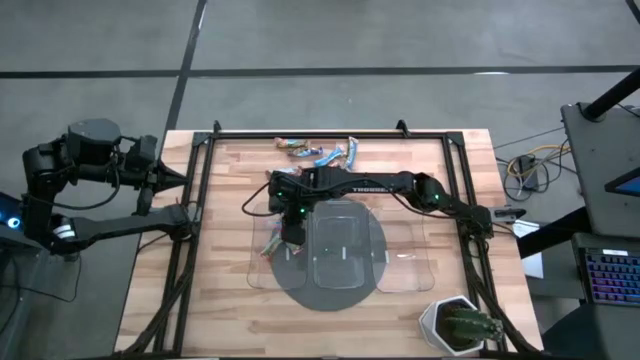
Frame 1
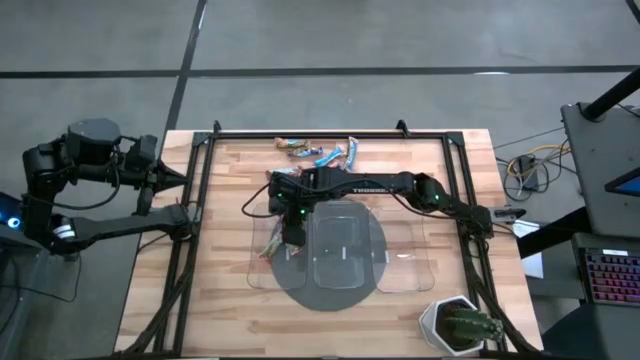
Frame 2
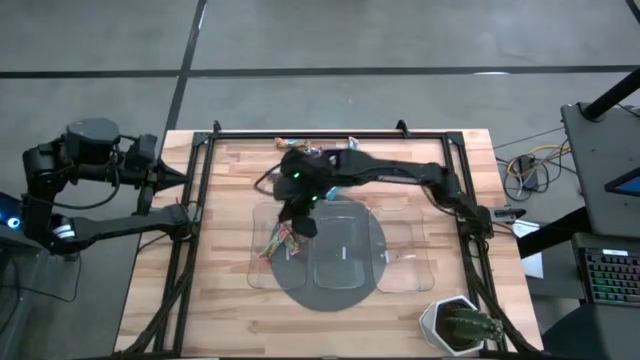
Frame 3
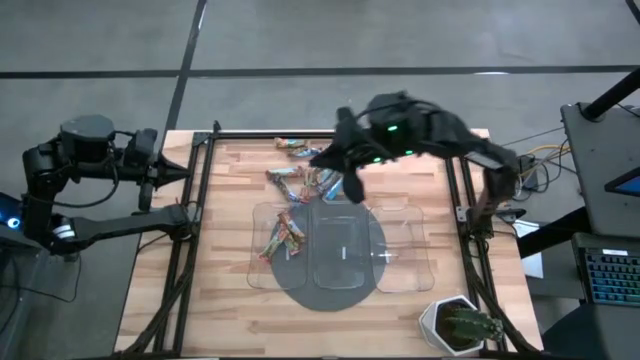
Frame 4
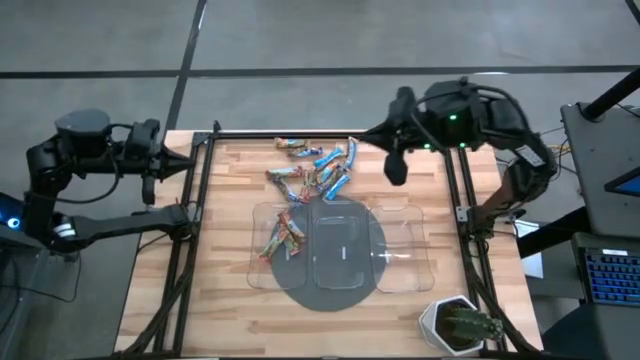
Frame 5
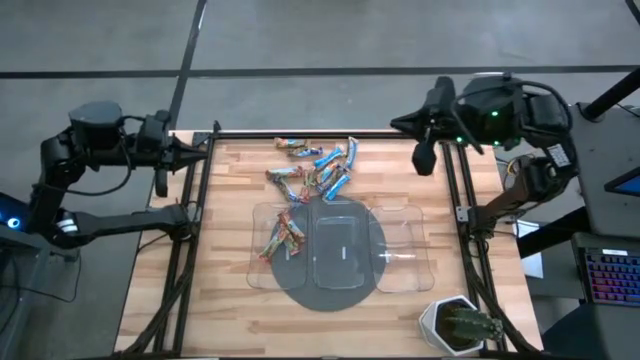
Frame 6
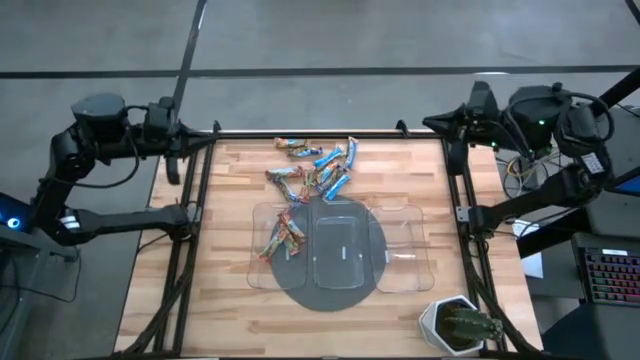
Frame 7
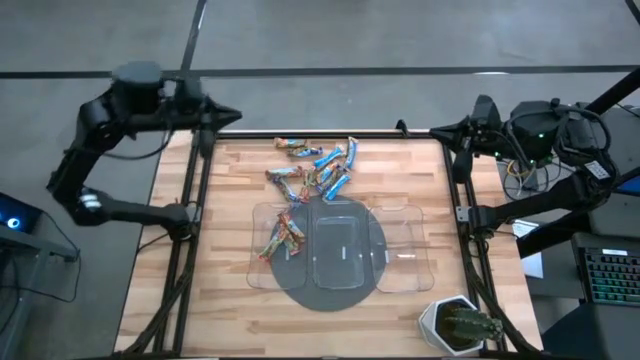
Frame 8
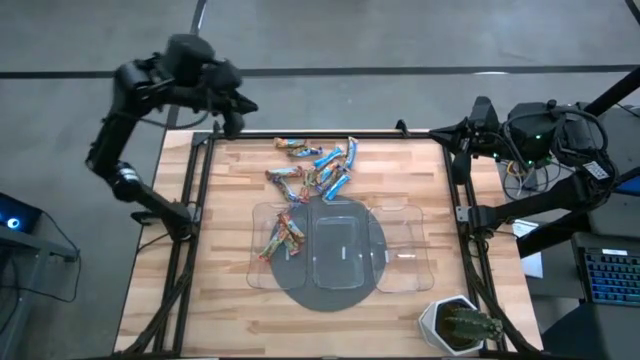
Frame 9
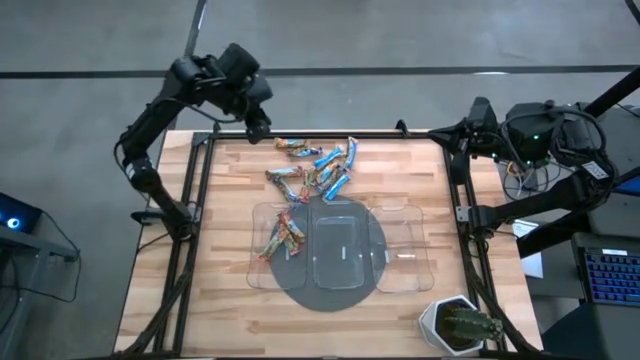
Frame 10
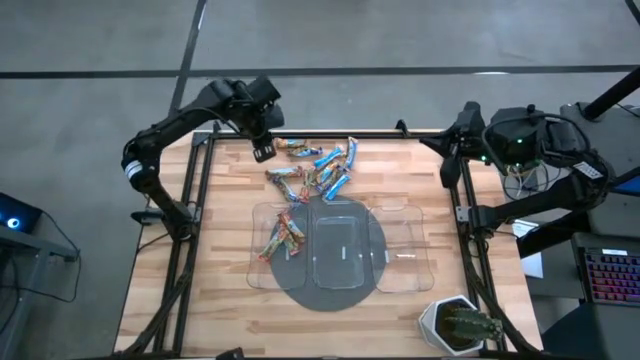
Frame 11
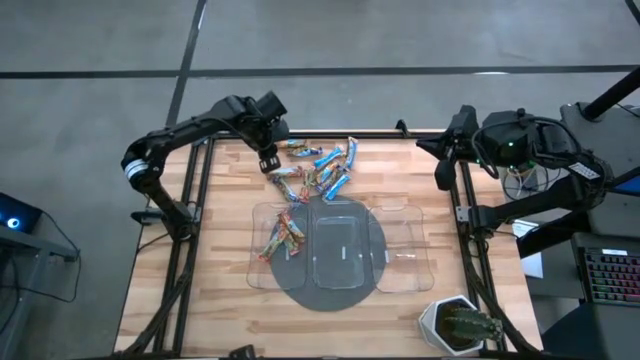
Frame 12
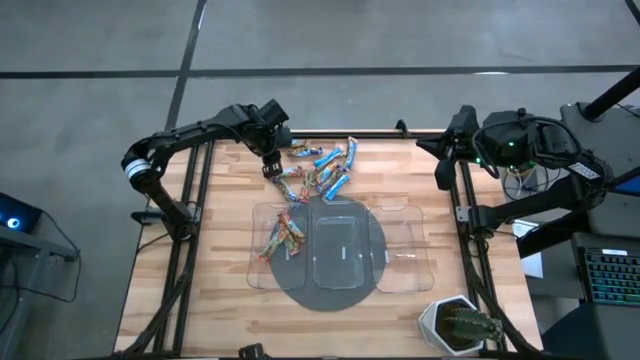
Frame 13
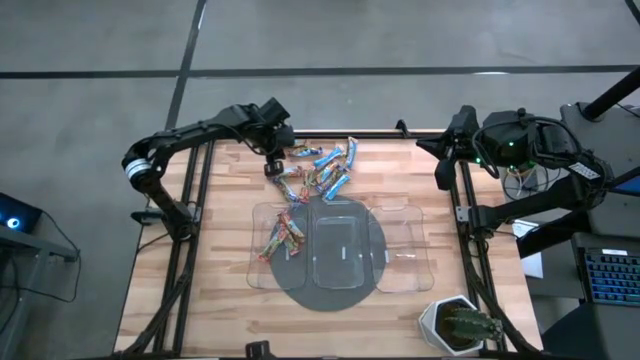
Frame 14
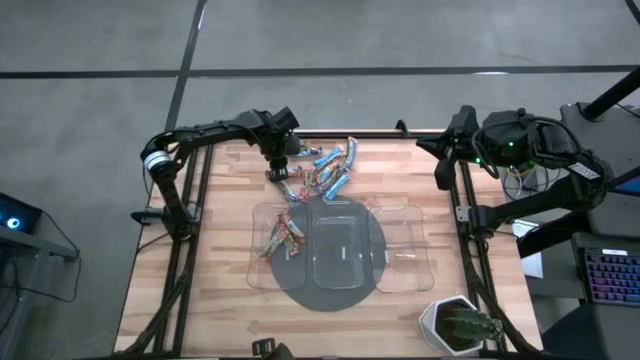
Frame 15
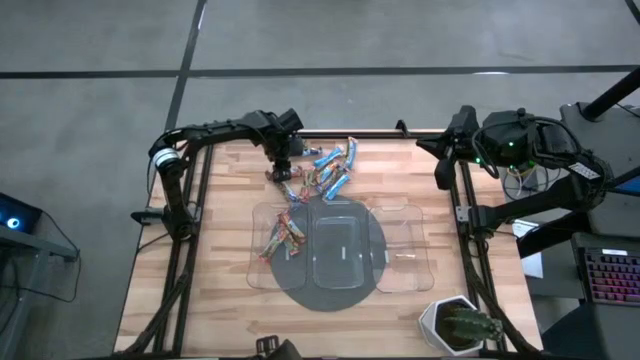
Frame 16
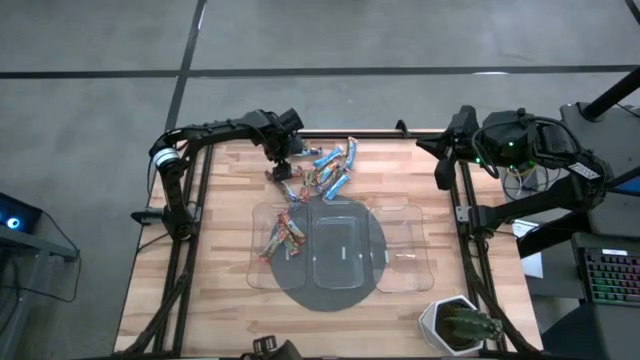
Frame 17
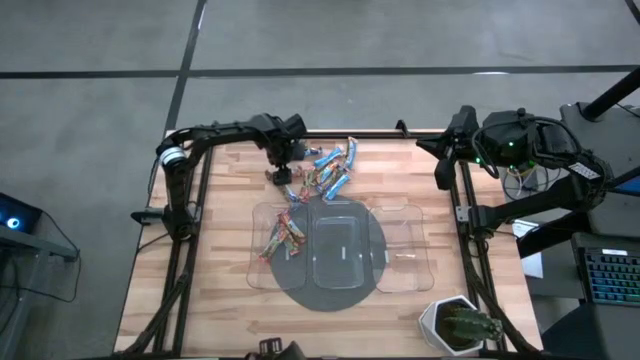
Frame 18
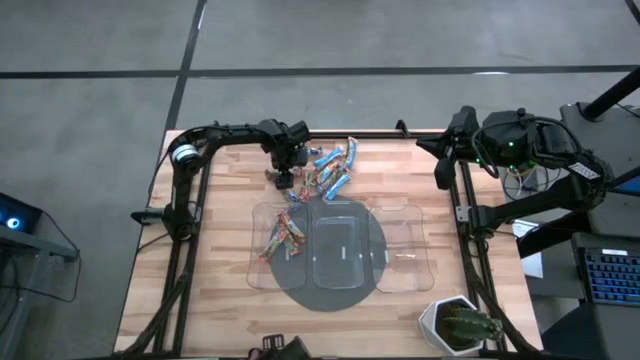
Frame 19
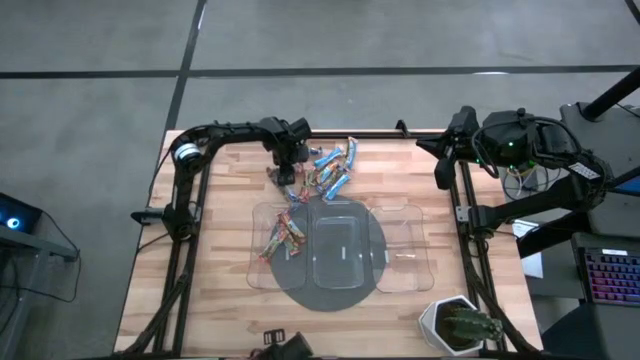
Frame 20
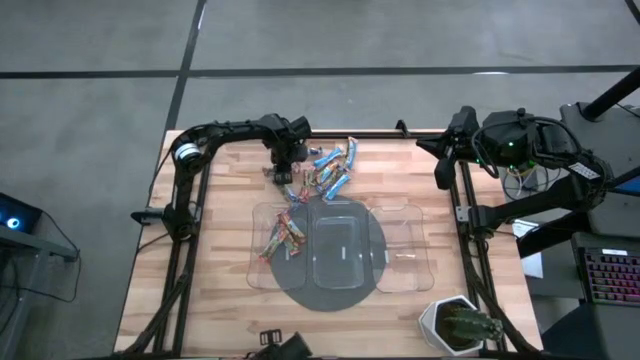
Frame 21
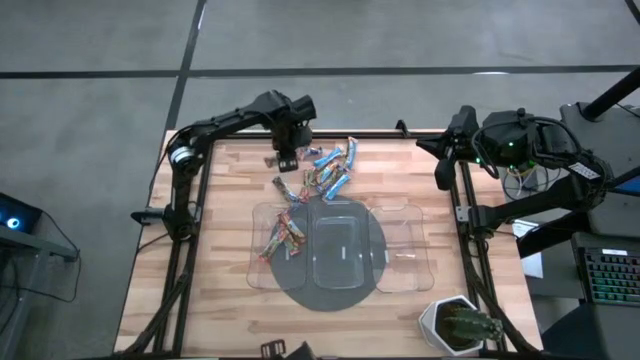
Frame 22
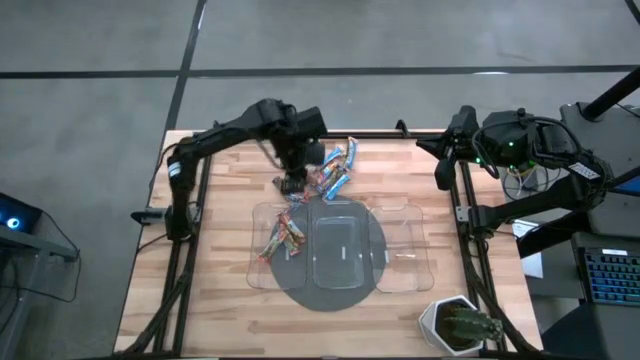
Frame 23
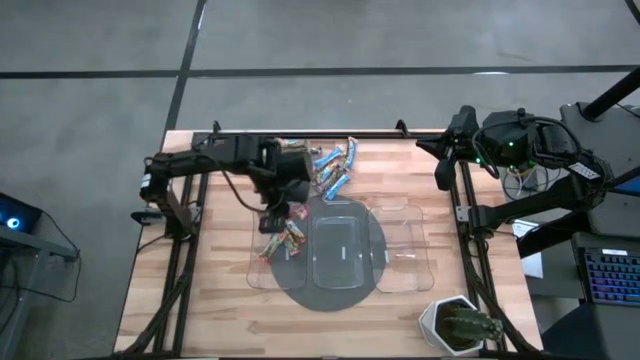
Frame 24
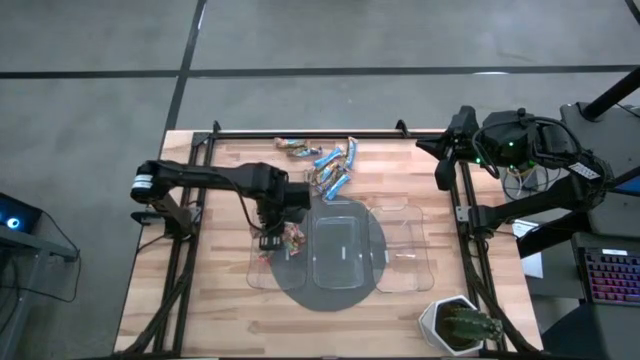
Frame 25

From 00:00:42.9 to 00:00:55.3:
Task: Pick and place Granola Bars by type
Put the red granola bar into the left transparent bin

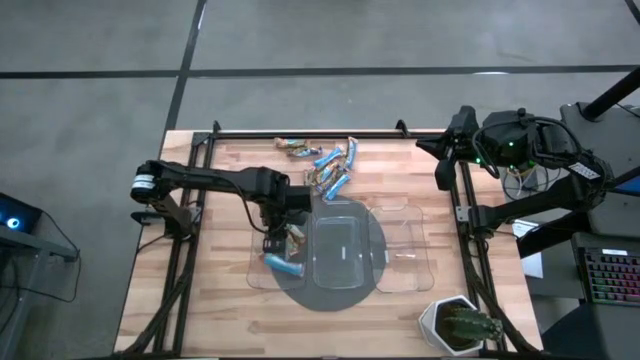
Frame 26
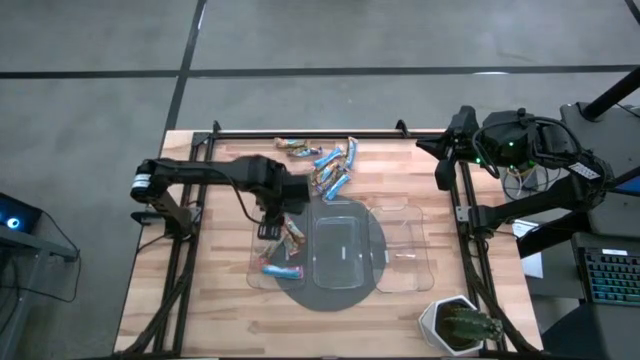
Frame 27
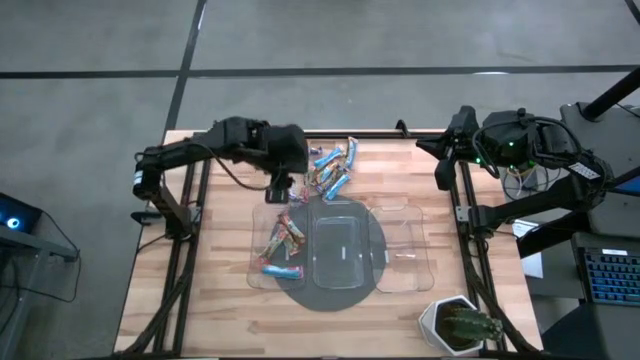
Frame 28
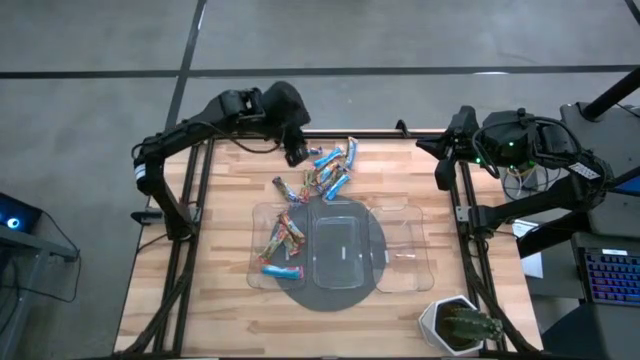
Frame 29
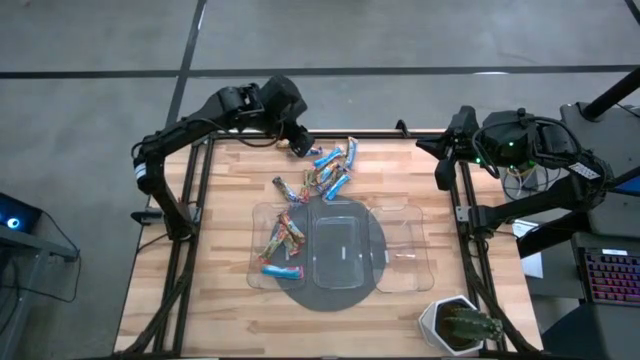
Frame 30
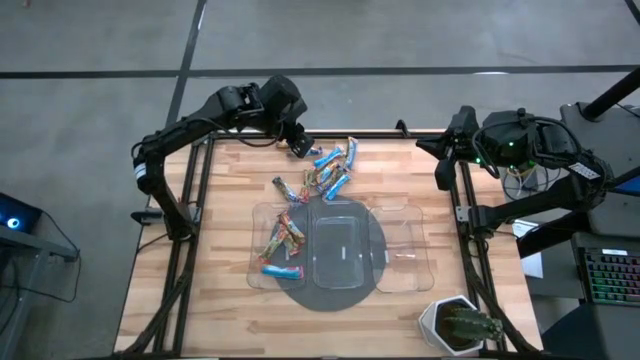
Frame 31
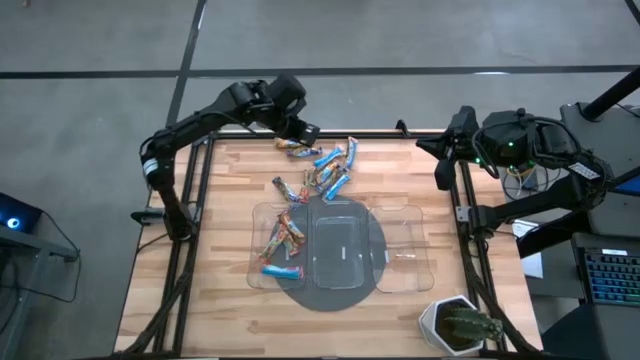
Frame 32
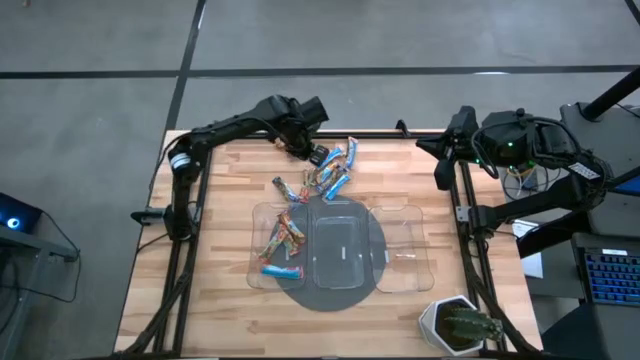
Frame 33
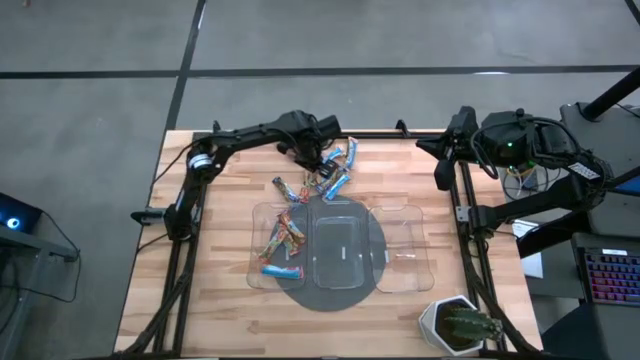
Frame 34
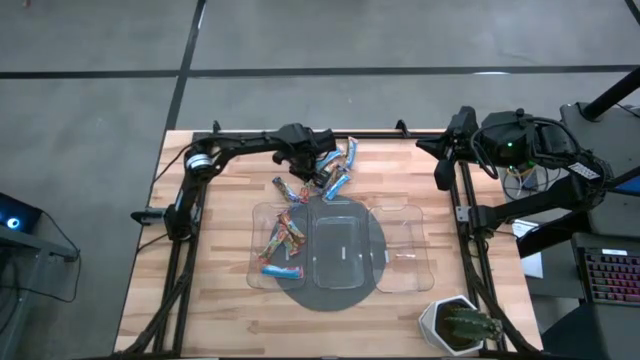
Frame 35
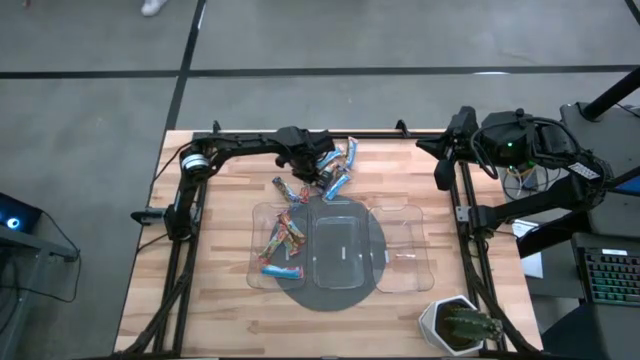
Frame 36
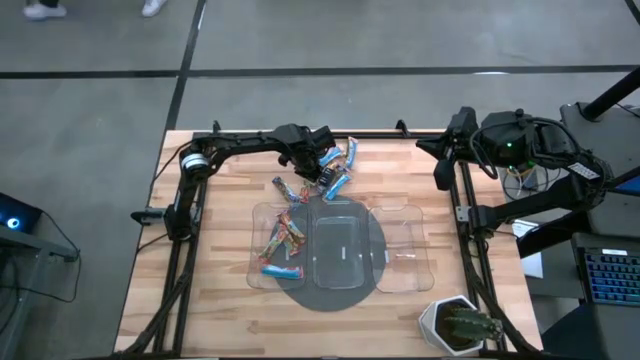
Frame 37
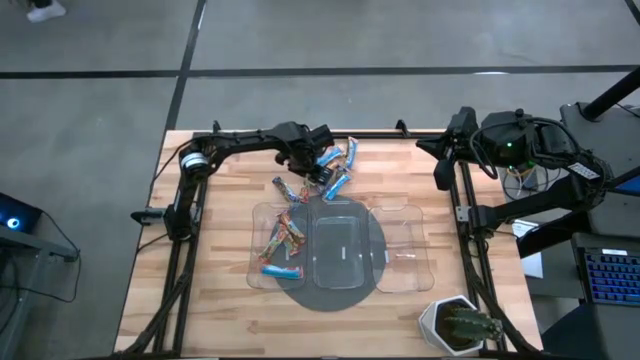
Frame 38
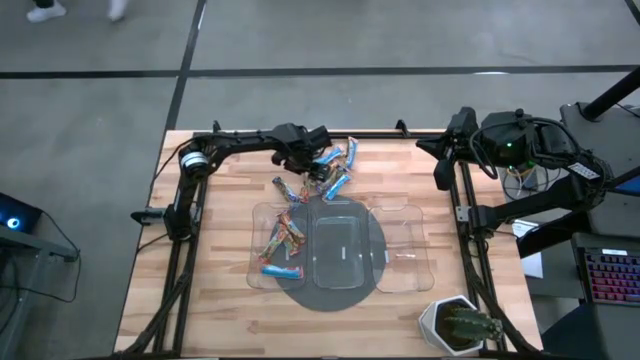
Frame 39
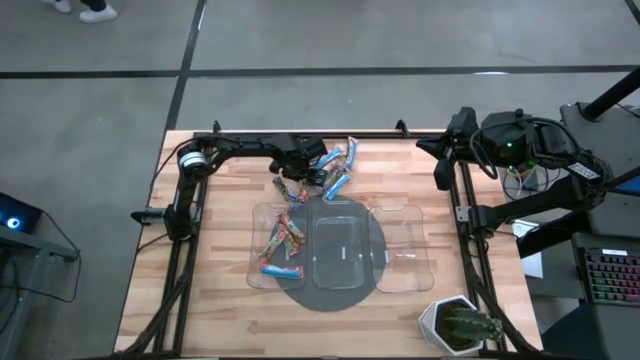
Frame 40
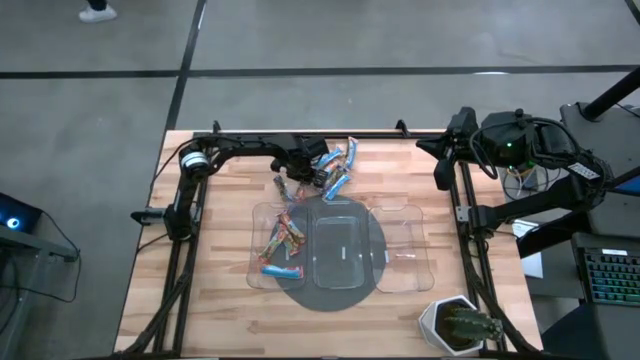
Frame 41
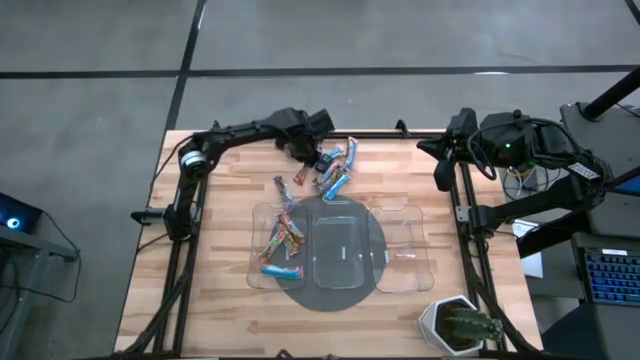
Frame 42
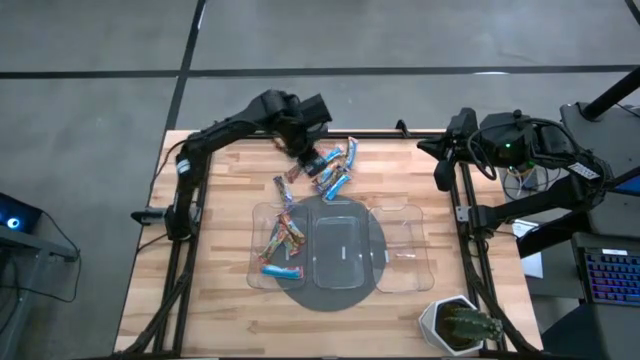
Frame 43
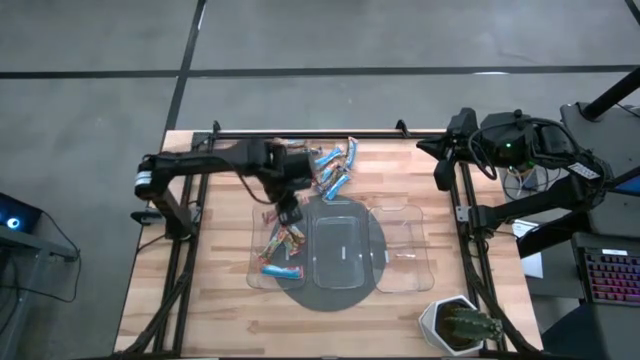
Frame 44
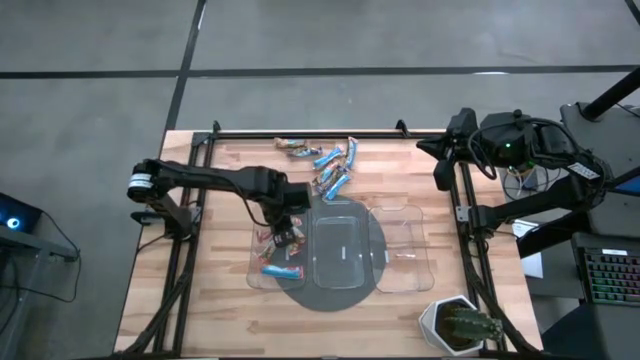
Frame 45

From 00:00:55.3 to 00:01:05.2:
Put the red granola bar into the left transparent bin
